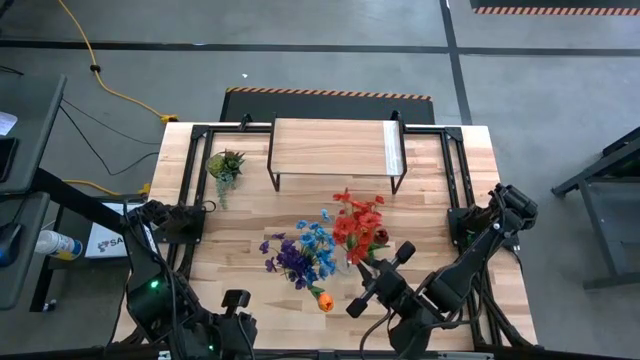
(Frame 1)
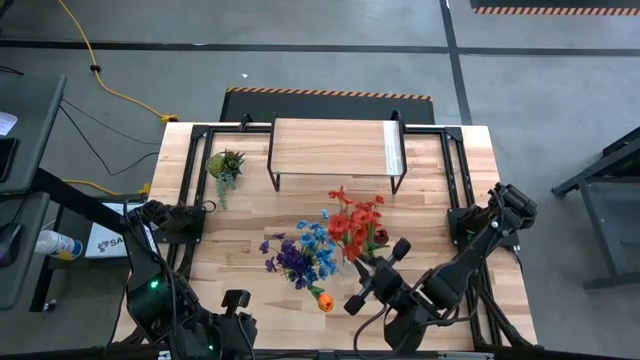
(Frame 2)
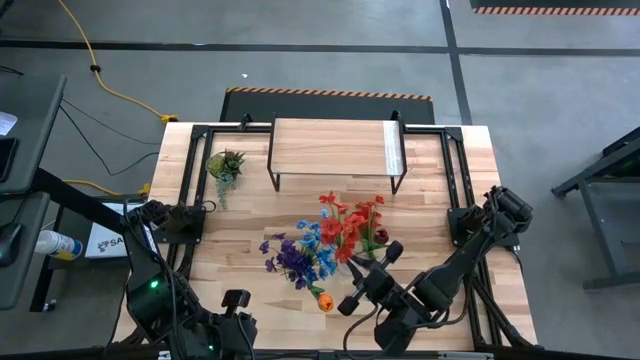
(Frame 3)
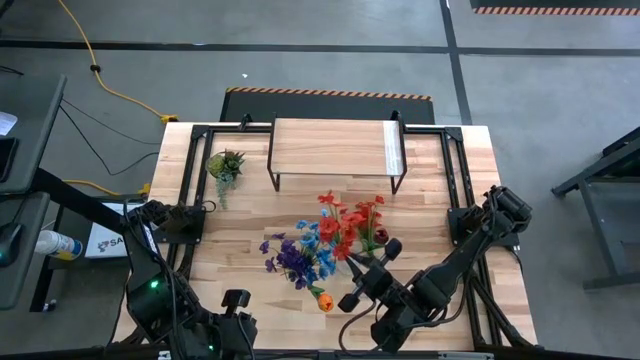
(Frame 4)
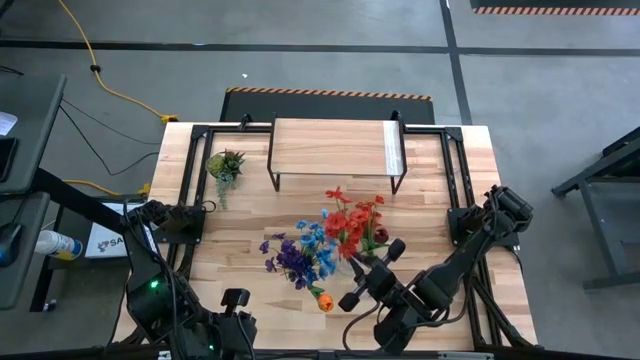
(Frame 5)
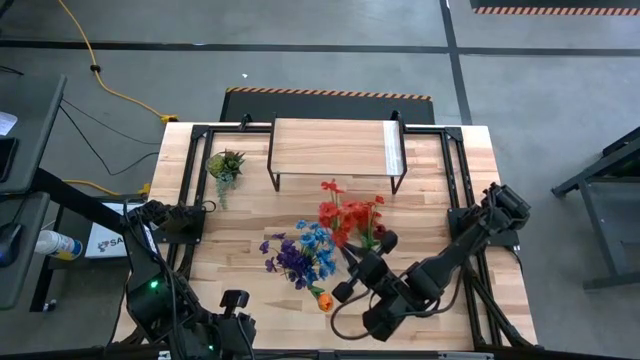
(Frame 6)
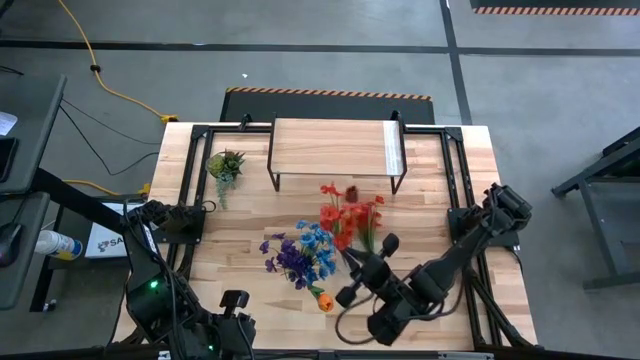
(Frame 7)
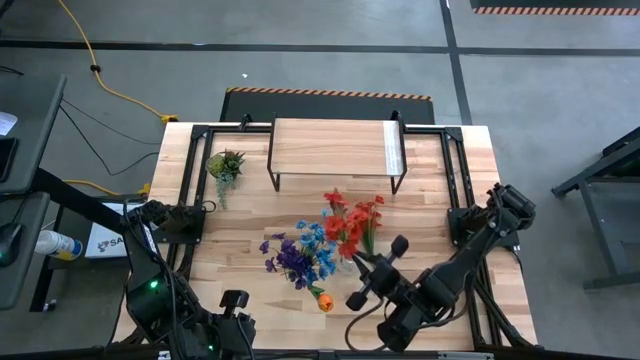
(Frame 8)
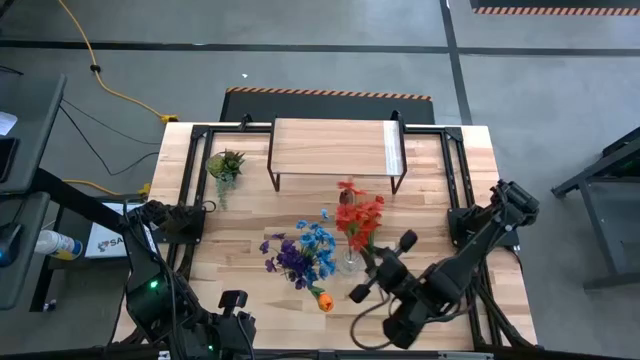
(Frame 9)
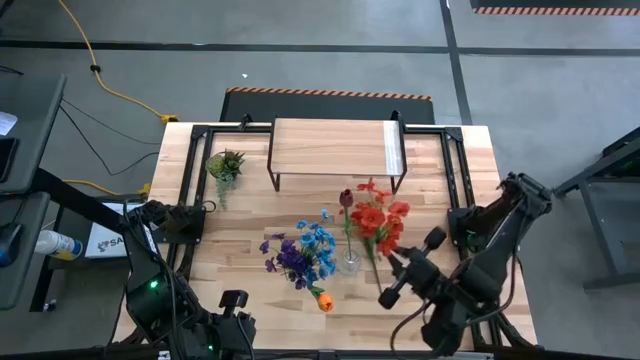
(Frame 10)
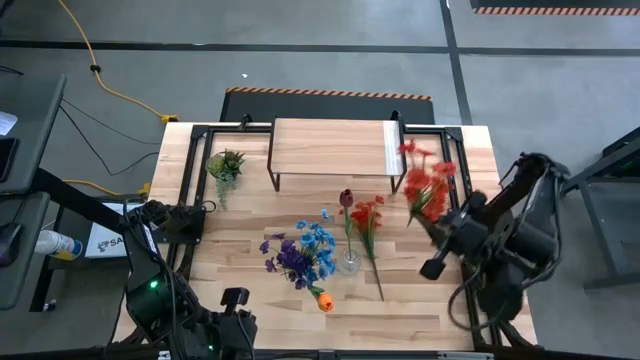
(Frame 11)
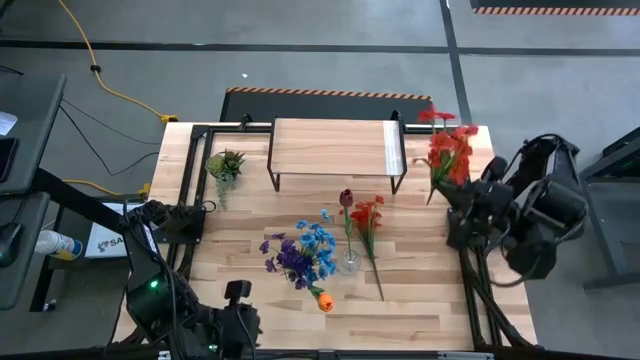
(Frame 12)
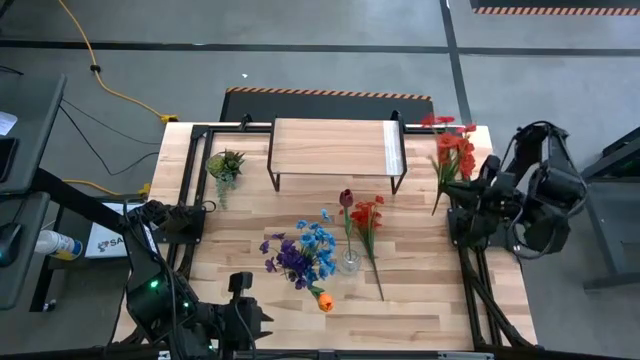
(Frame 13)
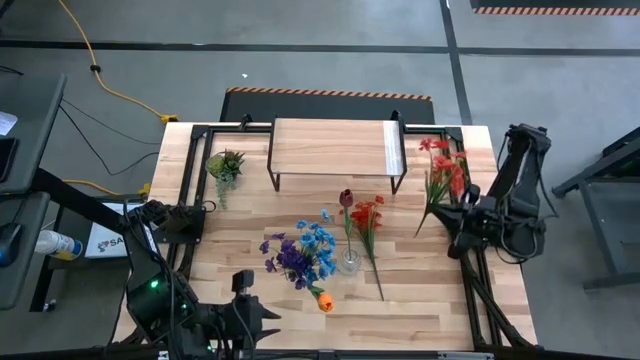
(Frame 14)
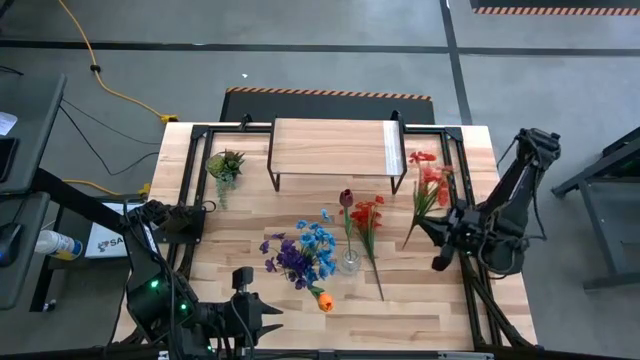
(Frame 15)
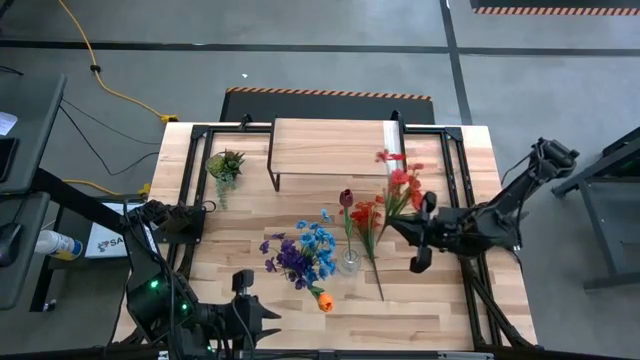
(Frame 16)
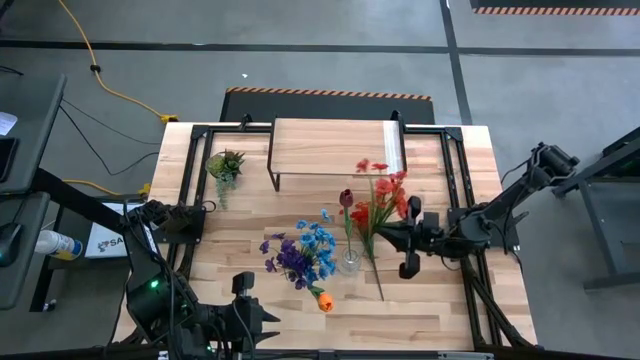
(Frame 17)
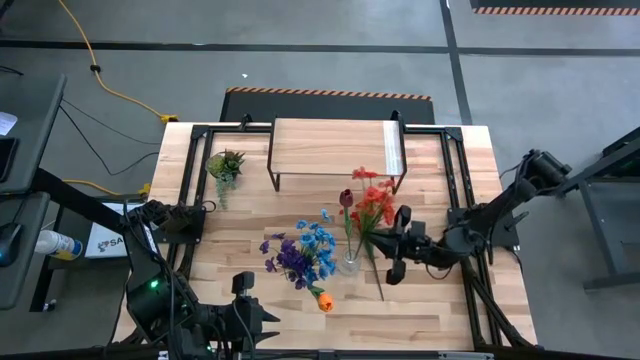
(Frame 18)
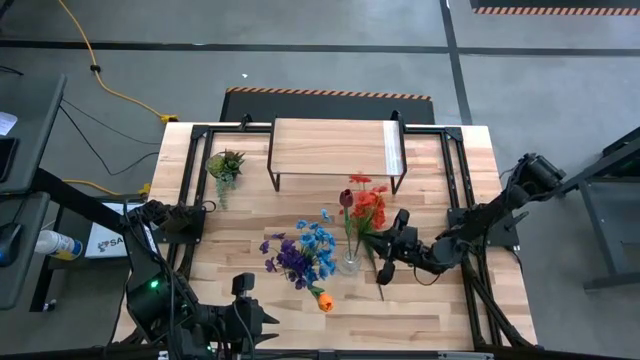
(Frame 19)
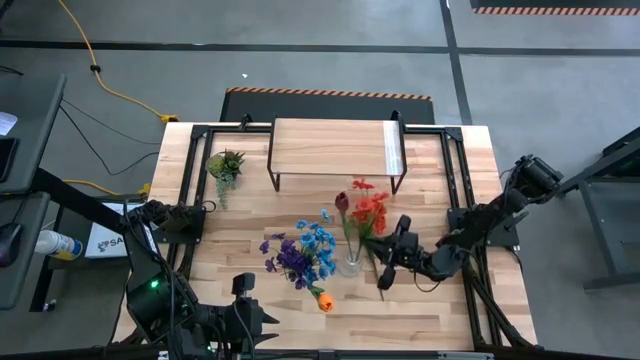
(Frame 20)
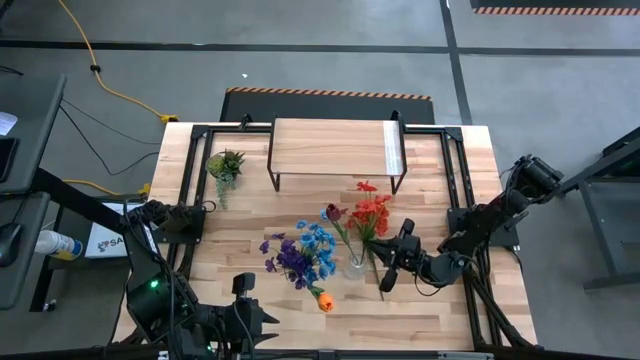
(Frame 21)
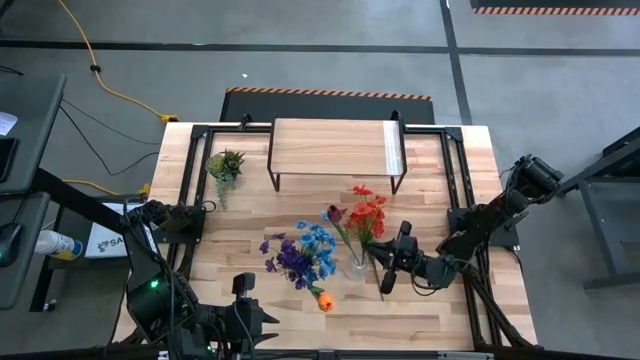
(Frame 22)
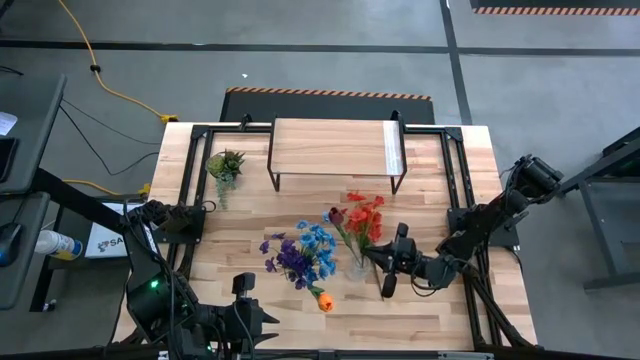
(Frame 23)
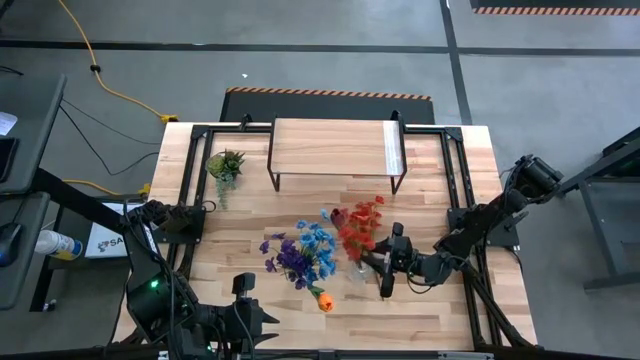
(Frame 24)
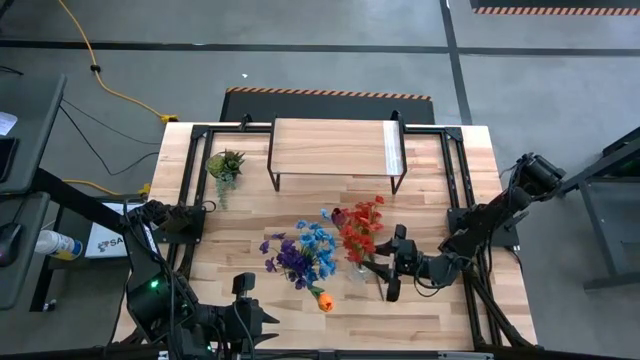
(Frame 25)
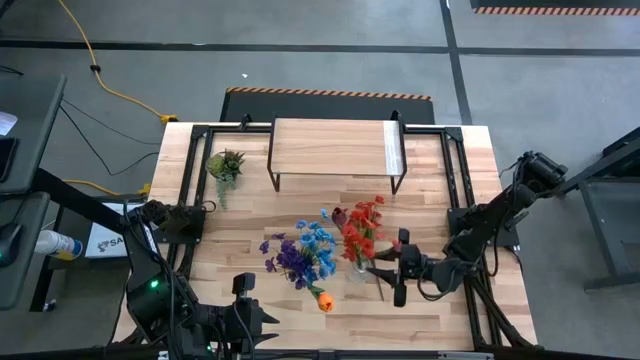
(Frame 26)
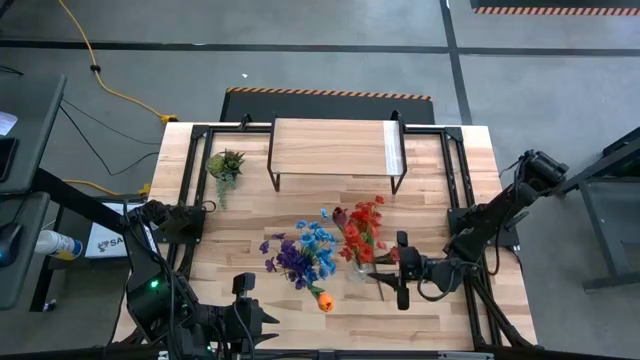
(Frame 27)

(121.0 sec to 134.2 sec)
Task: Pick and place flowers into a vace then onto a shelf
Put the orange flowers into the right transparent flower vase

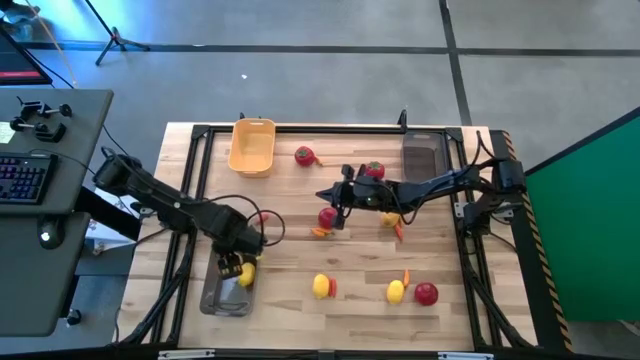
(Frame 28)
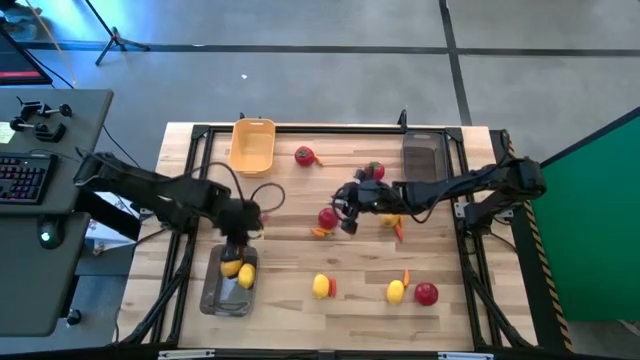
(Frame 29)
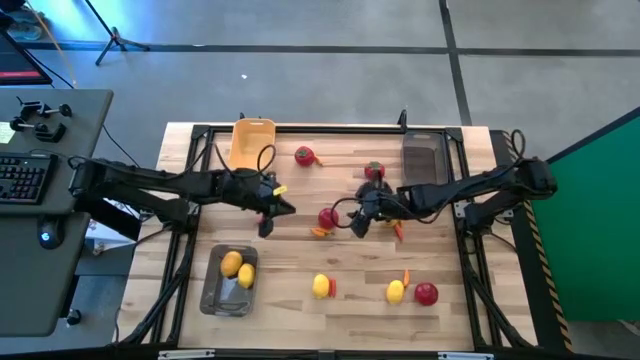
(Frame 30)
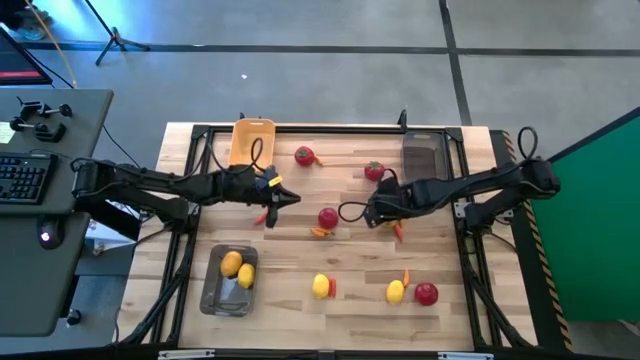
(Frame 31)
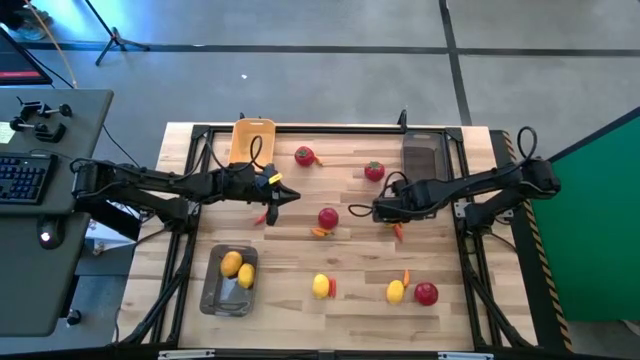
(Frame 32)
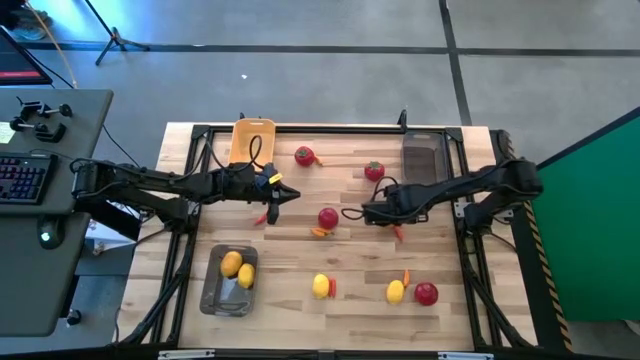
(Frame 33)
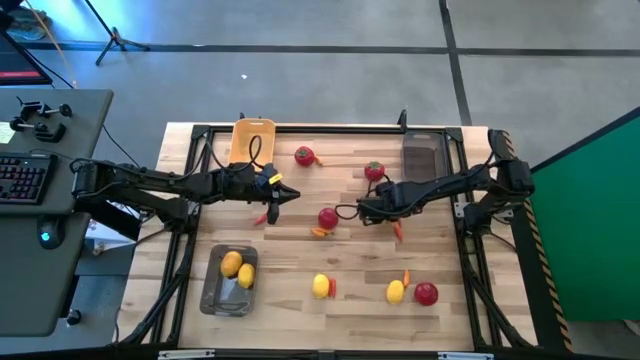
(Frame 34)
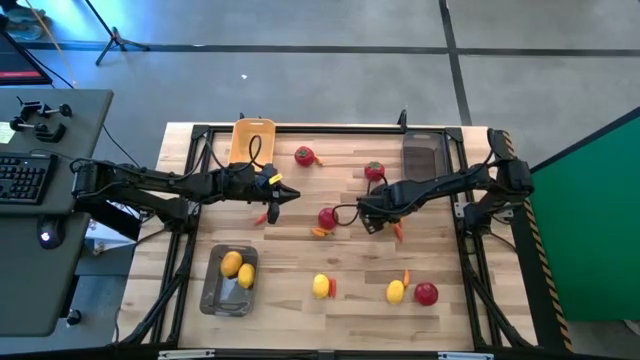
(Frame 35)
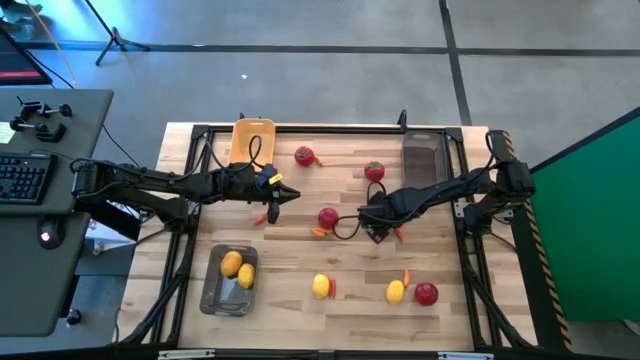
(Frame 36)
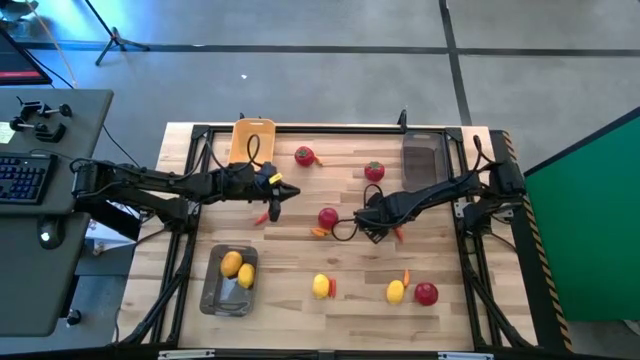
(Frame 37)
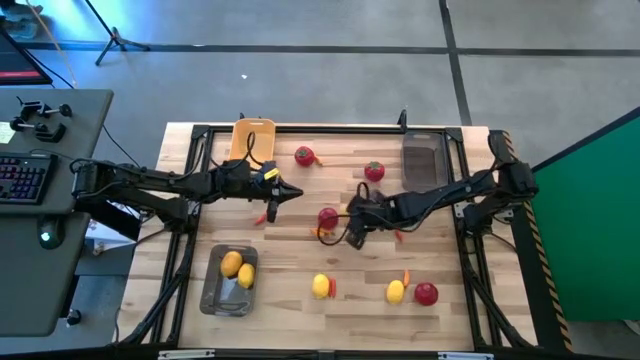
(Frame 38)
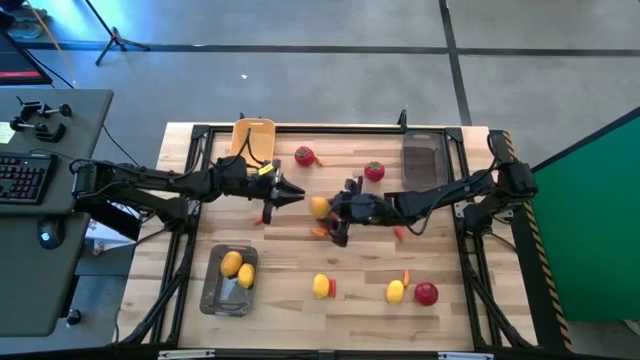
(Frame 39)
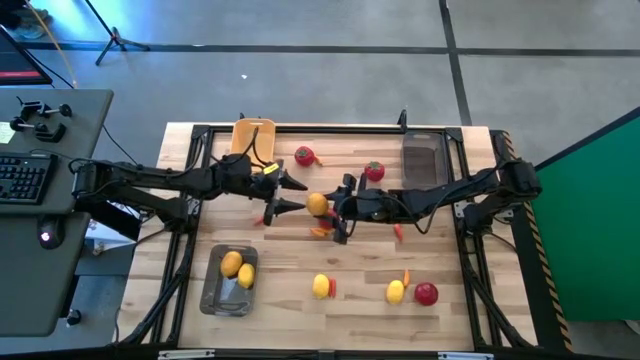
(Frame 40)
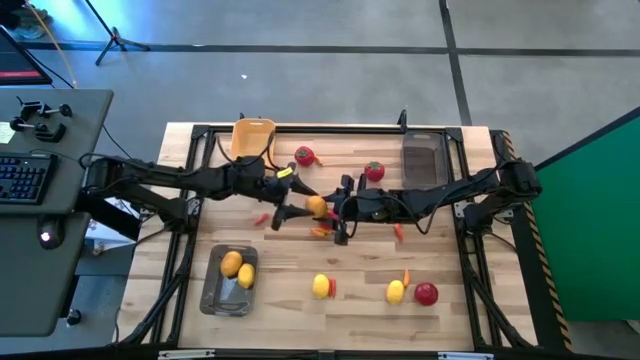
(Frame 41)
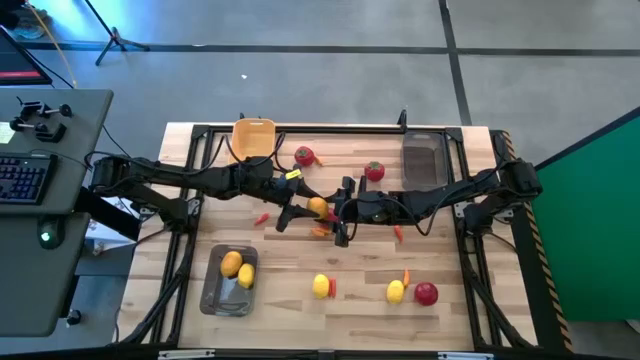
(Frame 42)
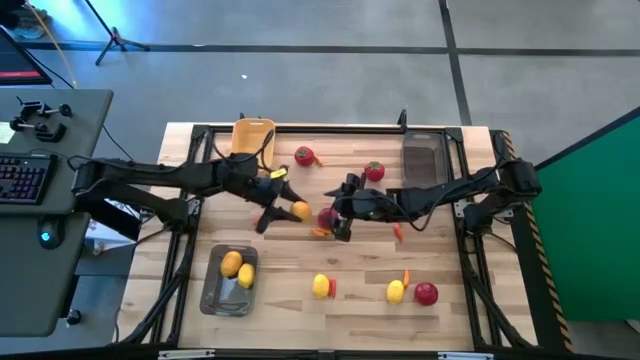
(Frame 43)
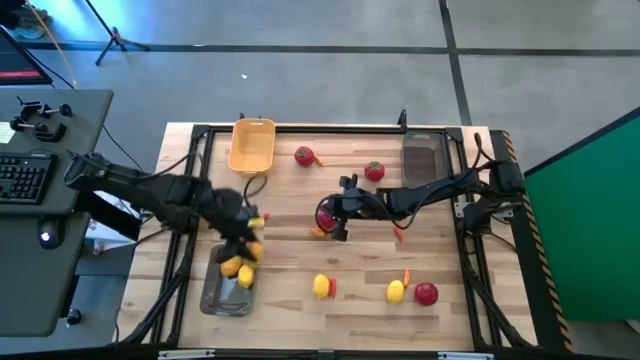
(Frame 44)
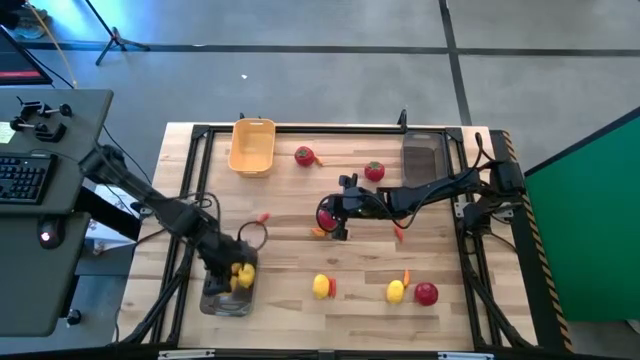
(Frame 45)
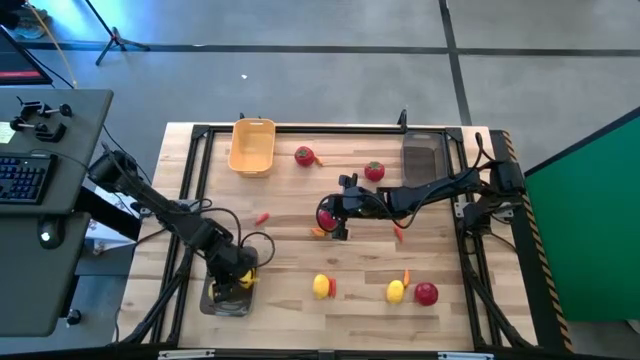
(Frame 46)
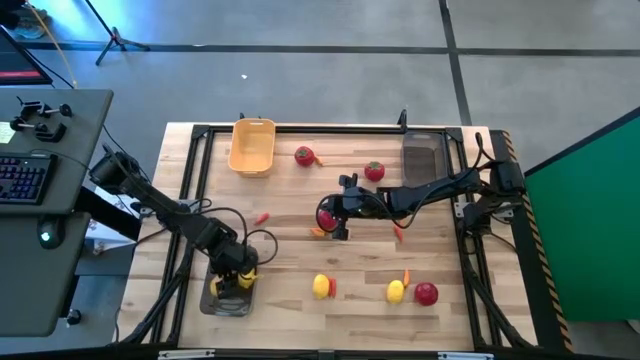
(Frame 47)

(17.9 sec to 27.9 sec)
Task: Sort produce into baskets
Put the lemon into the bottom gray bin
